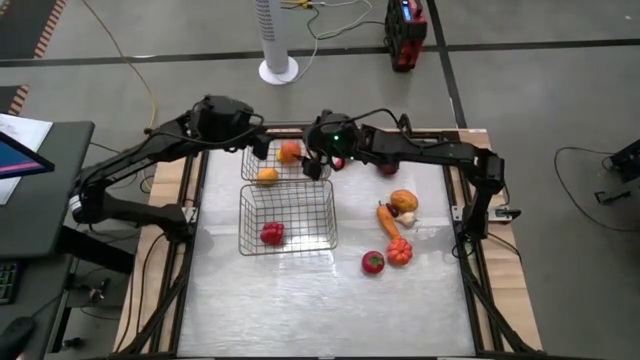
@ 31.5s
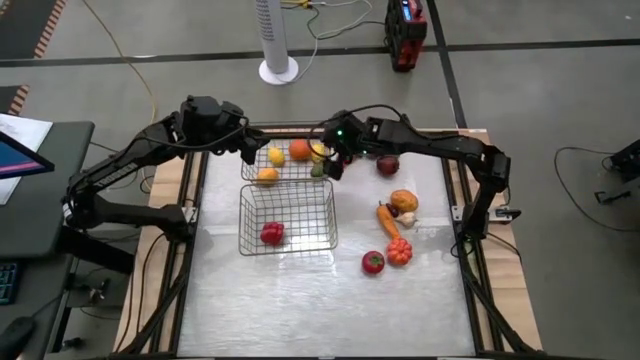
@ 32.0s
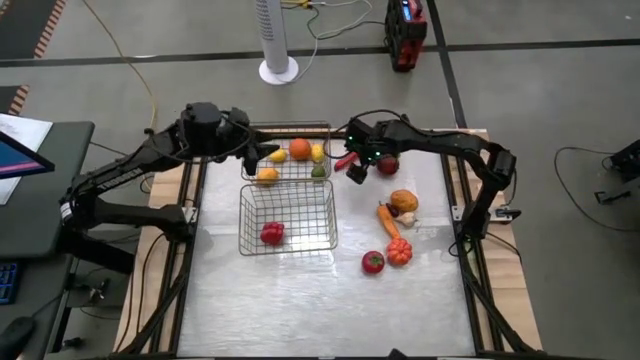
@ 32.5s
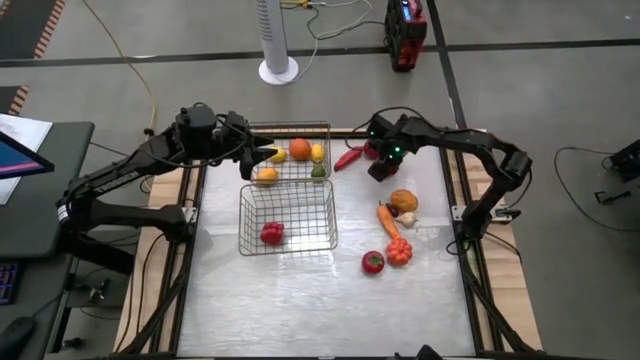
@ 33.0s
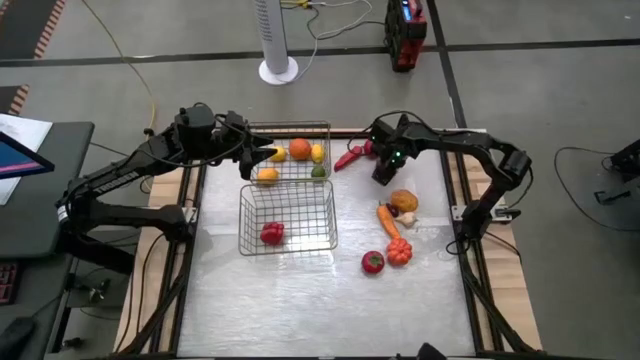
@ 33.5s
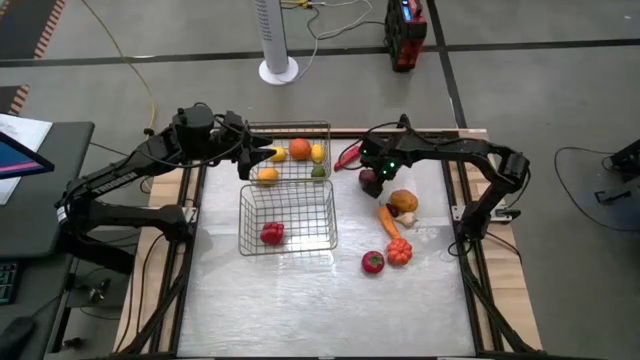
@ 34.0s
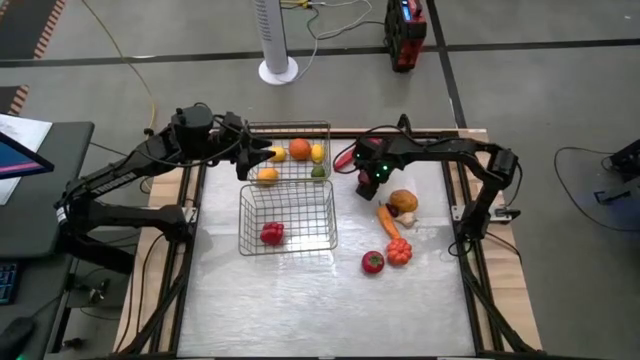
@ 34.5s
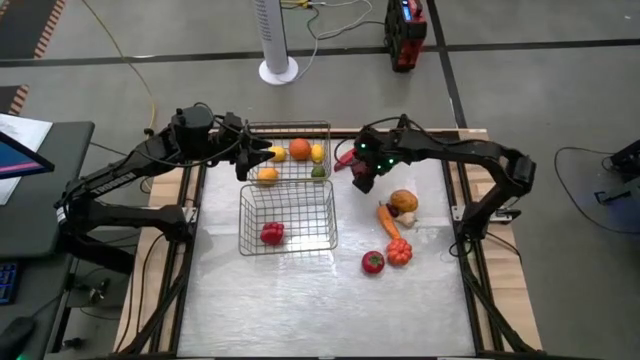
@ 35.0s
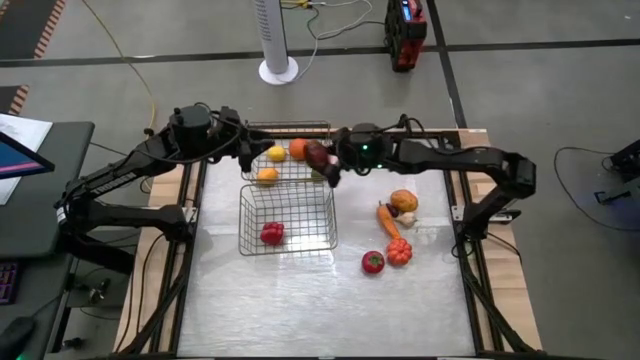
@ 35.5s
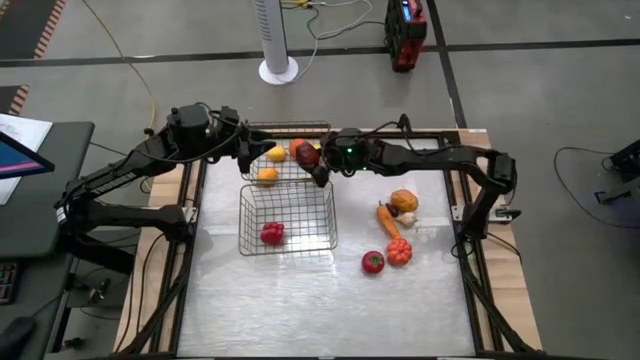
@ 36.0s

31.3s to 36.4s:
Task: Sort produce into baskets
Put the red apple into the top mesh basket

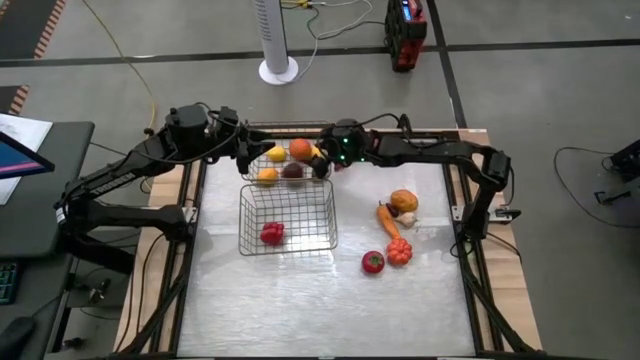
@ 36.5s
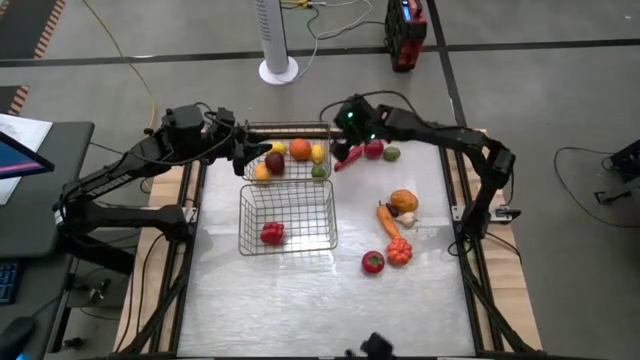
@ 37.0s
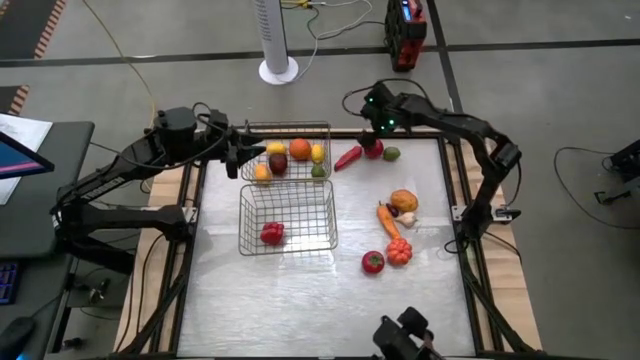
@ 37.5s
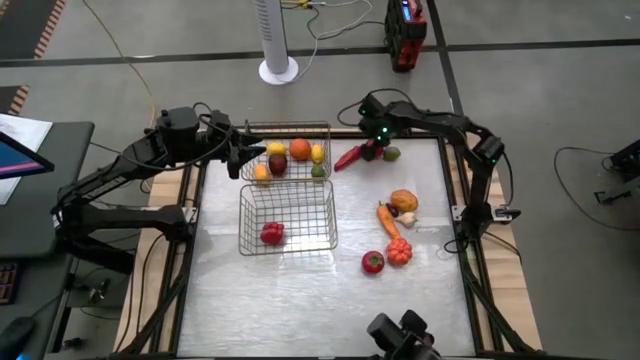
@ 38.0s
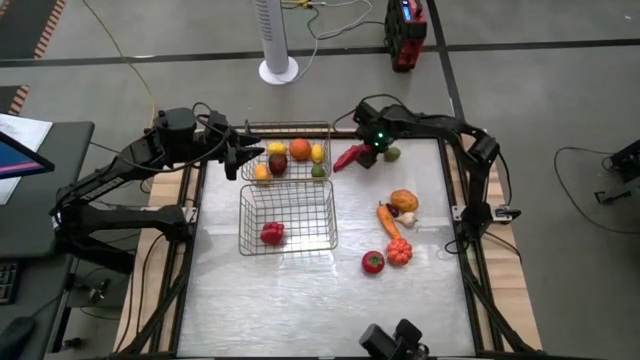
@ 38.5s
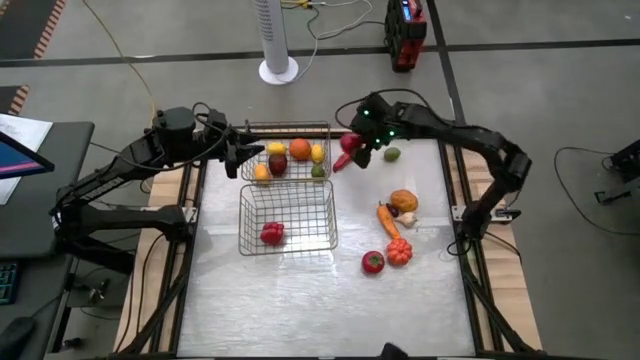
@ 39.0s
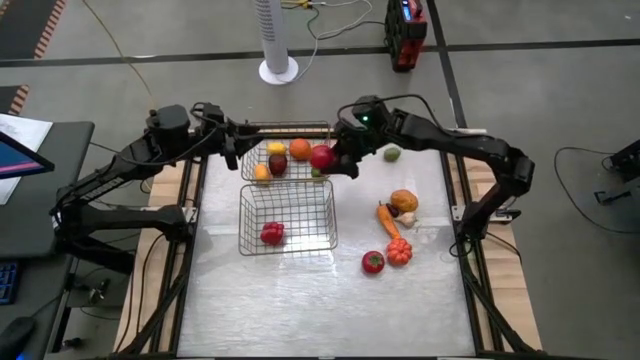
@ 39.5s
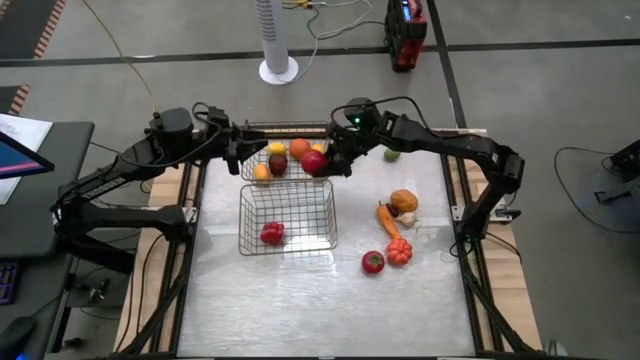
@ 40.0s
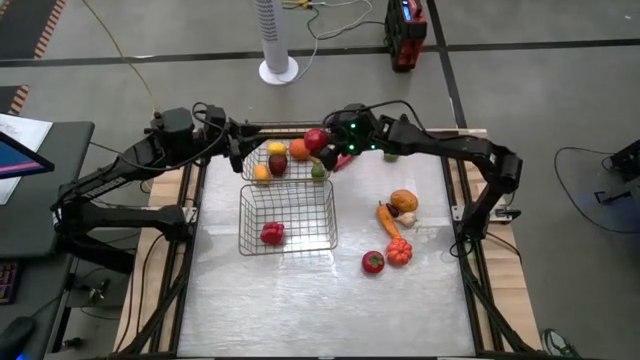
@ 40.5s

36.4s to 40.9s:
Put the red tomato into the top mesh basket

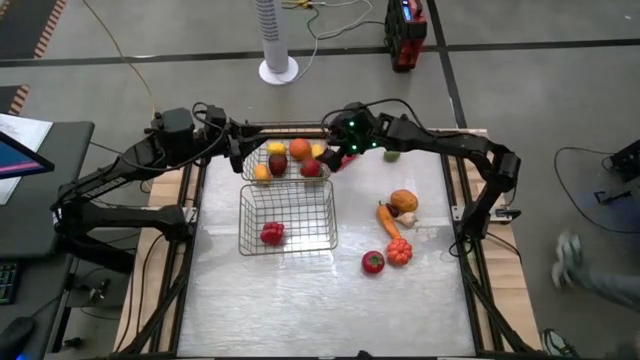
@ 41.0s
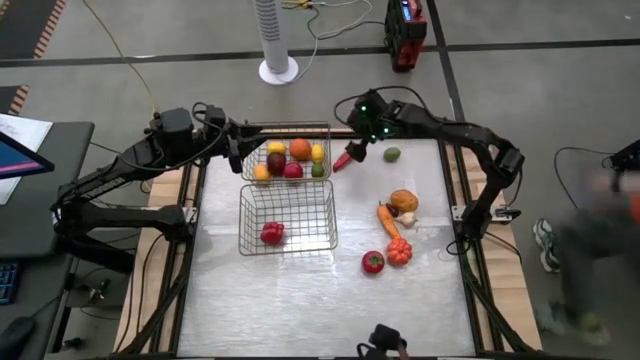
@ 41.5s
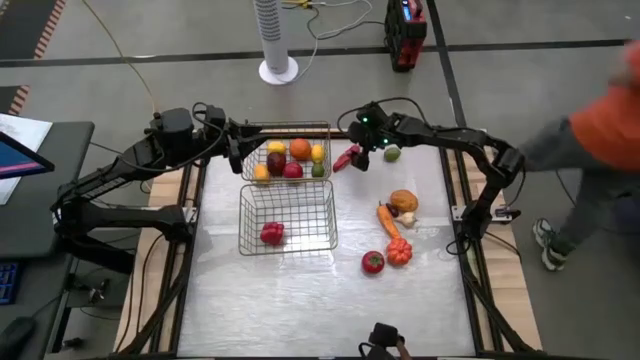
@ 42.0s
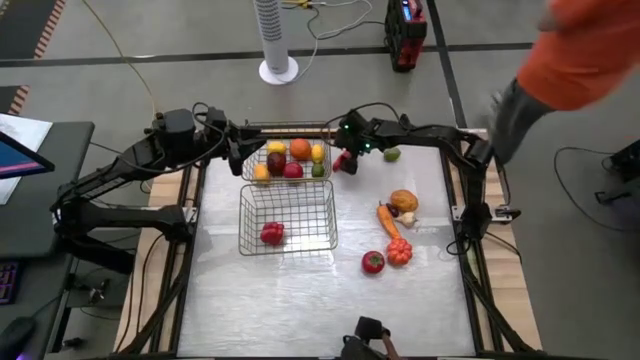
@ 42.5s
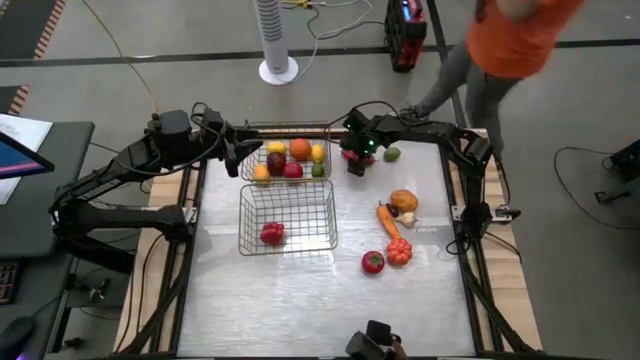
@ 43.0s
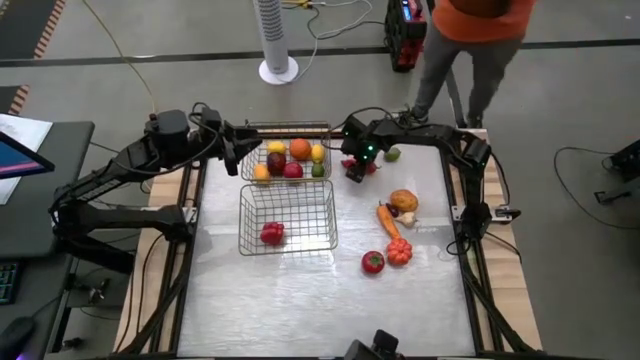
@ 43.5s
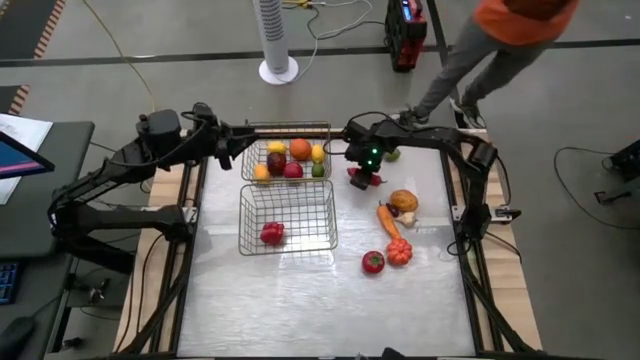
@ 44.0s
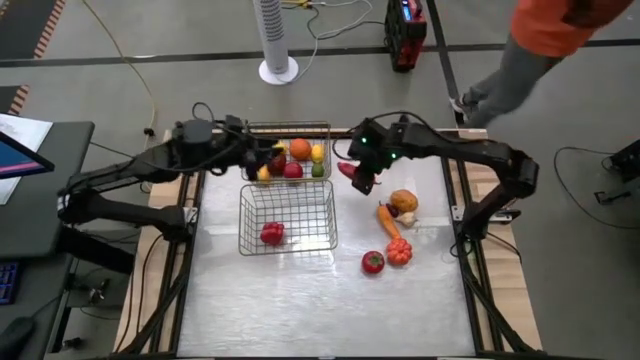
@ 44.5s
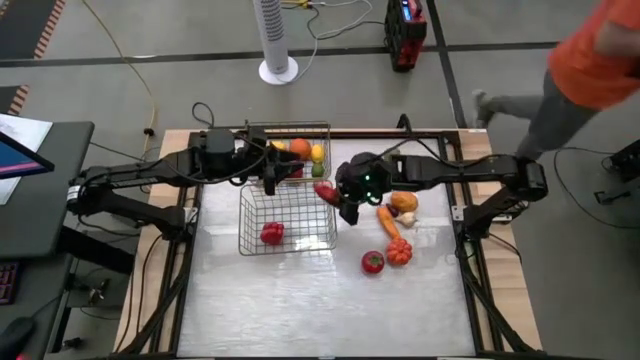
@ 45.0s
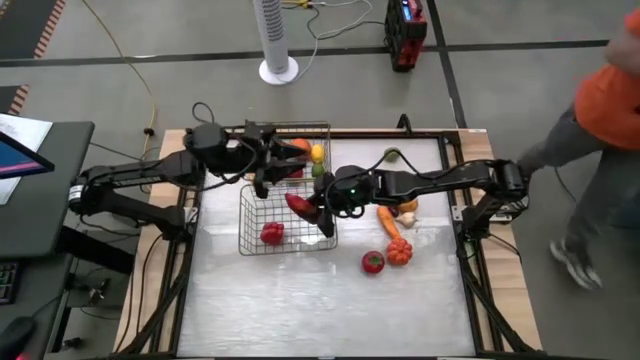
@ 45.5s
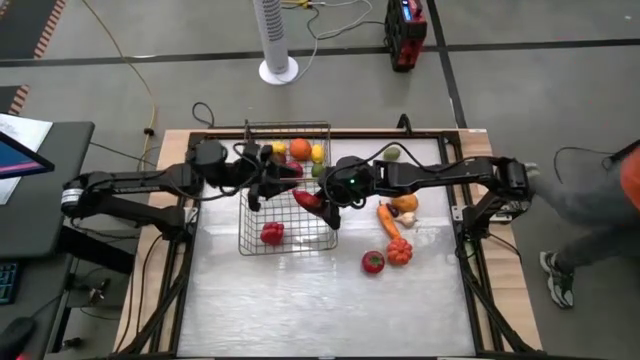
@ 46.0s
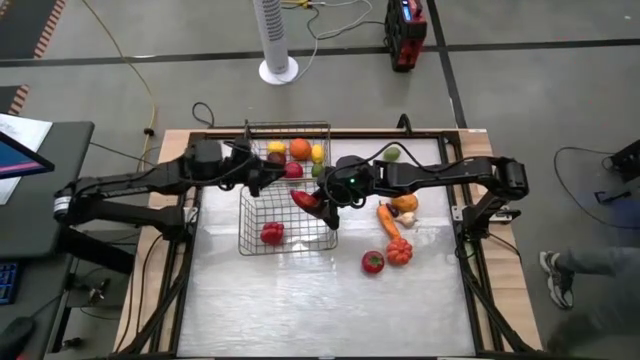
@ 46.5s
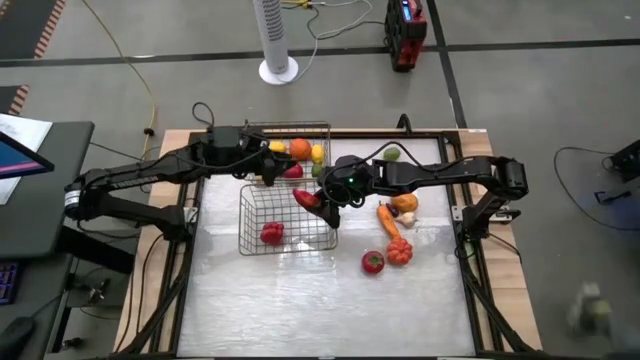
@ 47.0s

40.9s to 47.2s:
Put the red jalapeno pepper into the bottom mesh basket

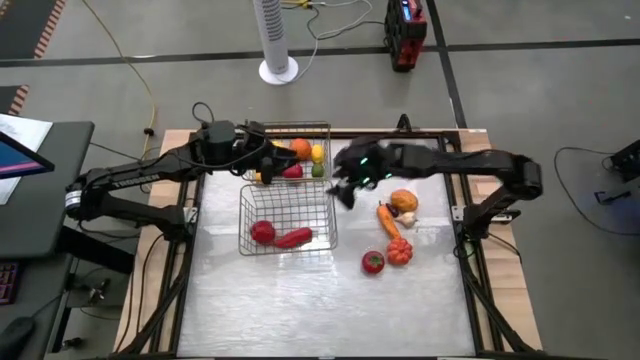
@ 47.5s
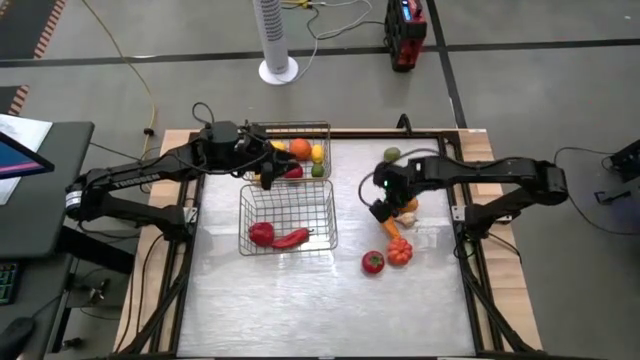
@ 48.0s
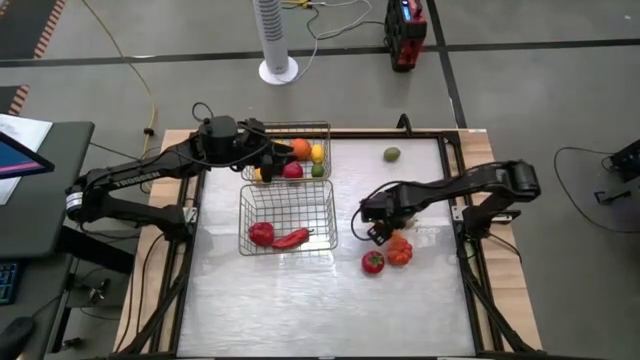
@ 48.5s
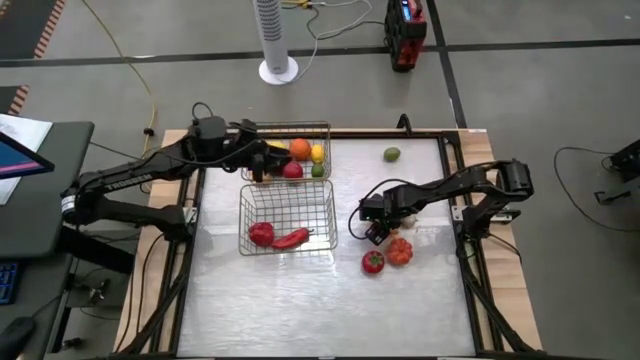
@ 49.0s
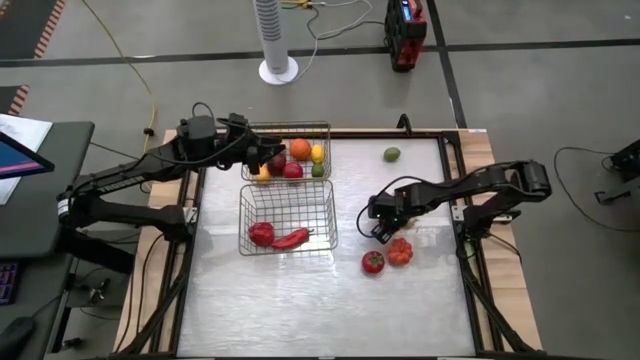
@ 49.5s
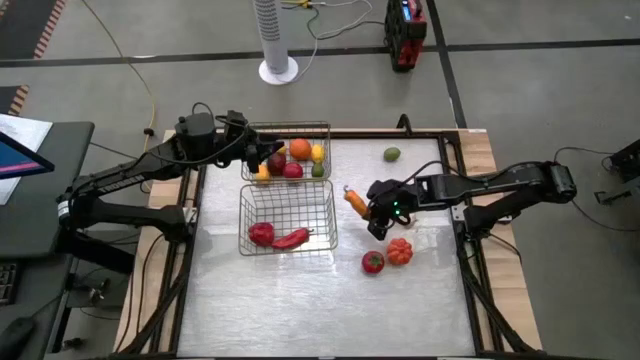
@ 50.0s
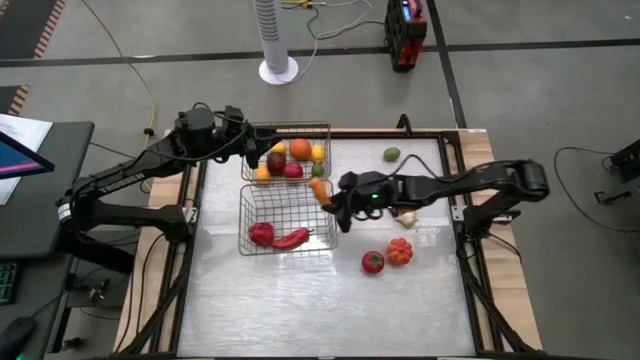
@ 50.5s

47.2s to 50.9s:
Put the yellow jalapeno pepper into the bottom mesh basket

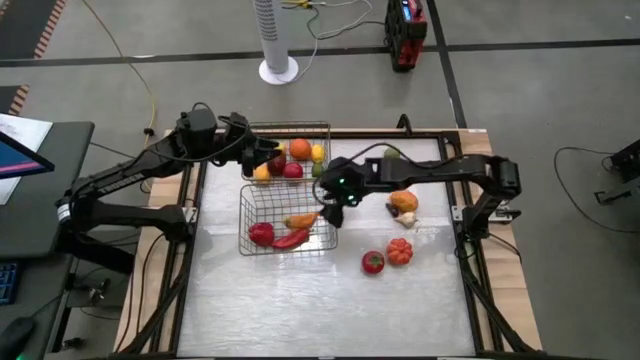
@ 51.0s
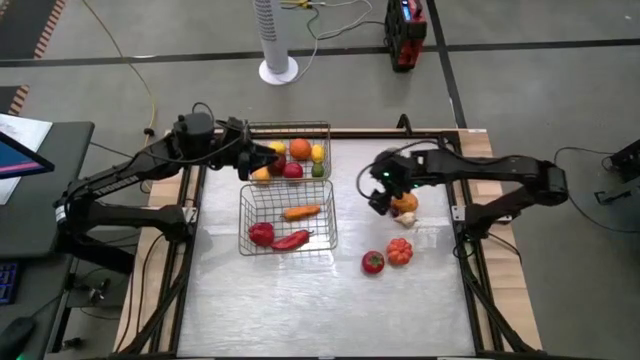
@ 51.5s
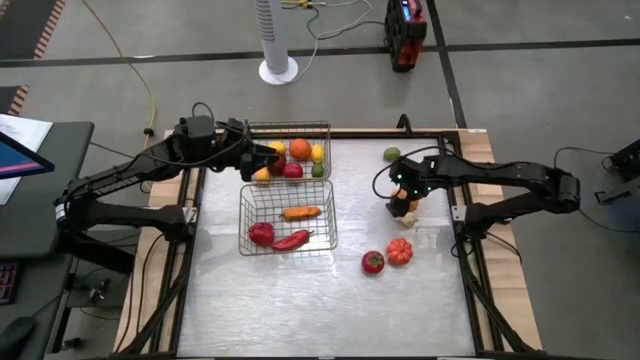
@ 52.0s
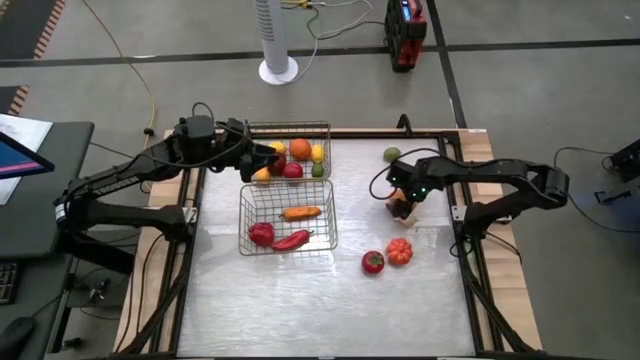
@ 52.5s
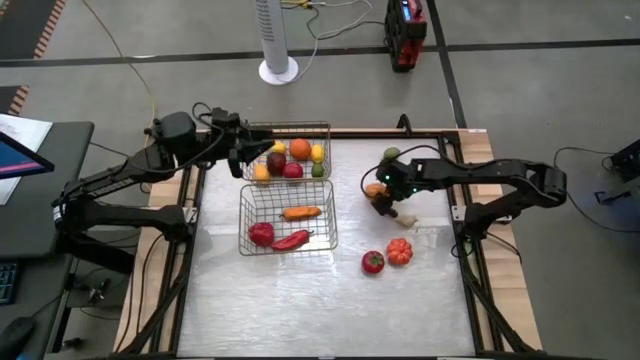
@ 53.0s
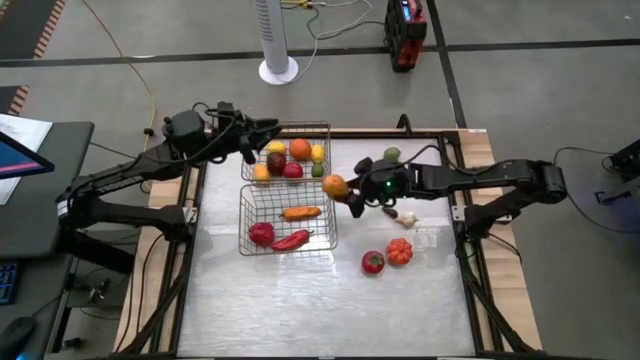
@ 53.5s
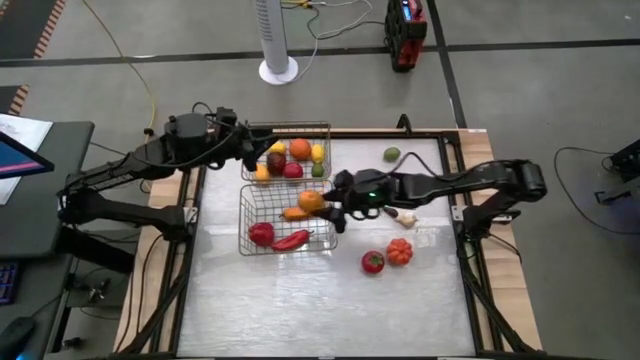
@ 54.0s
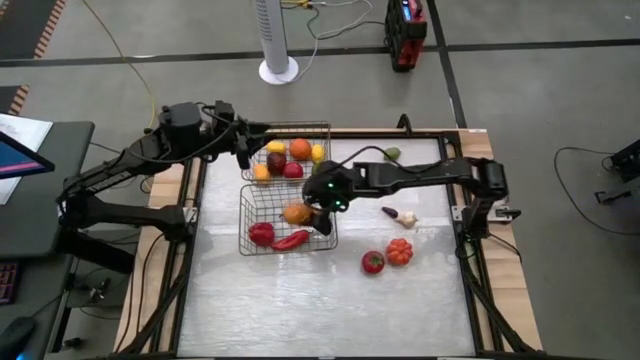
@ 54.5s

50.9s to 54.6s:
Put the brown potato into the bottom mesh basket
